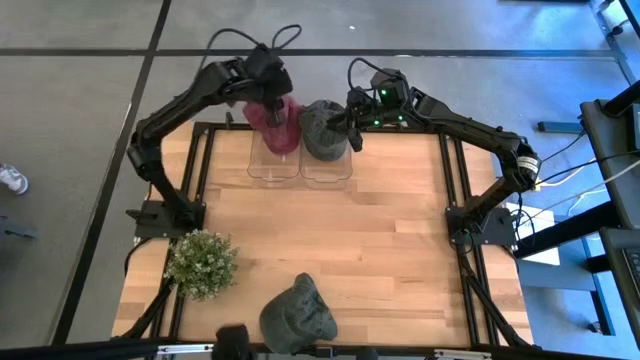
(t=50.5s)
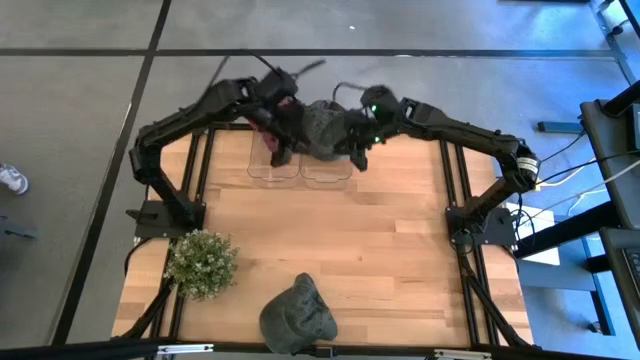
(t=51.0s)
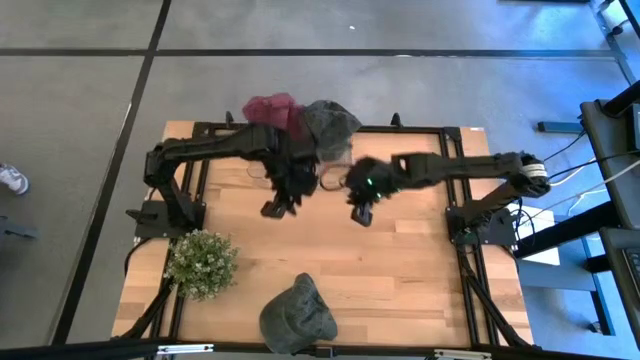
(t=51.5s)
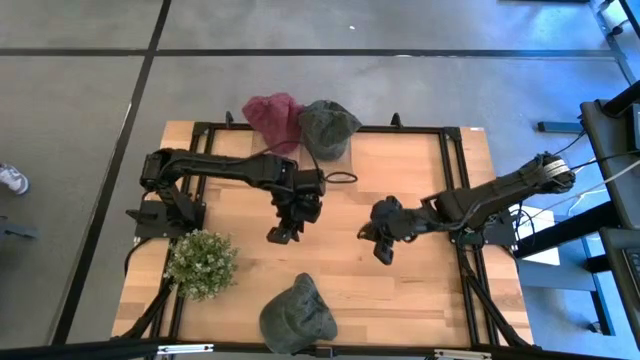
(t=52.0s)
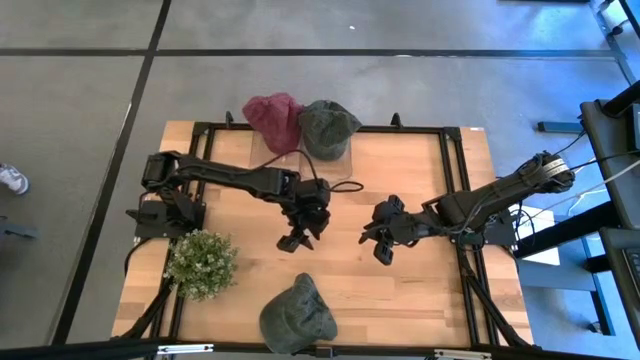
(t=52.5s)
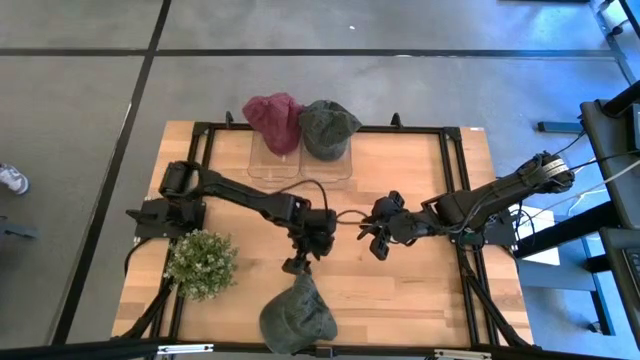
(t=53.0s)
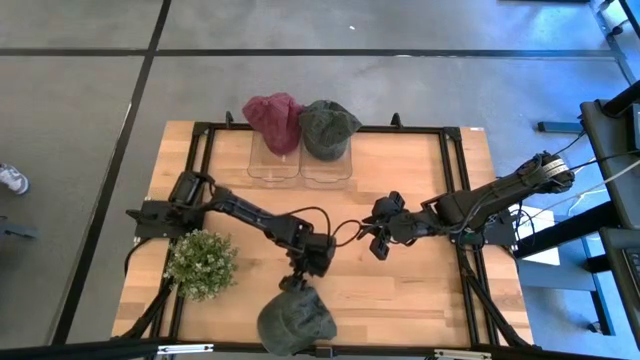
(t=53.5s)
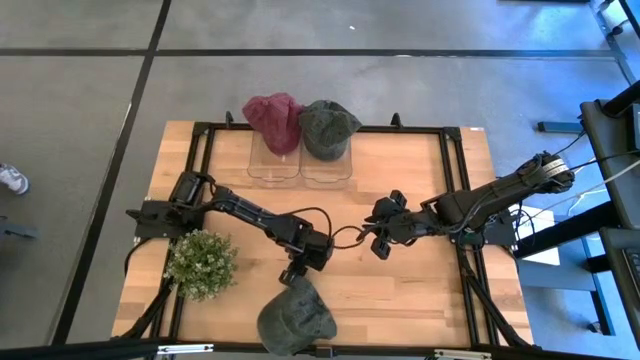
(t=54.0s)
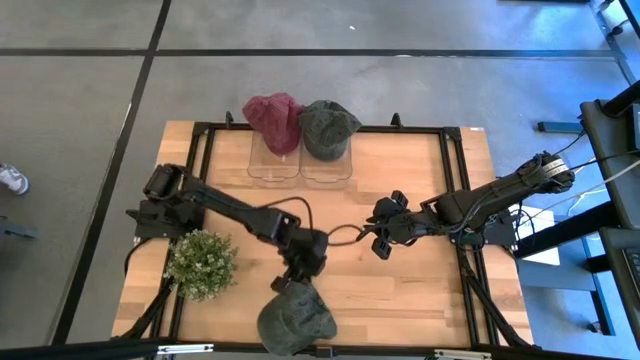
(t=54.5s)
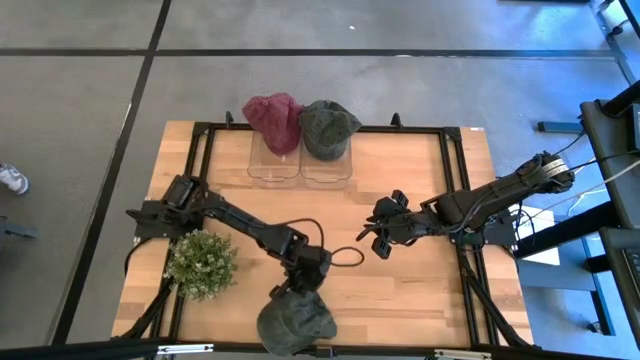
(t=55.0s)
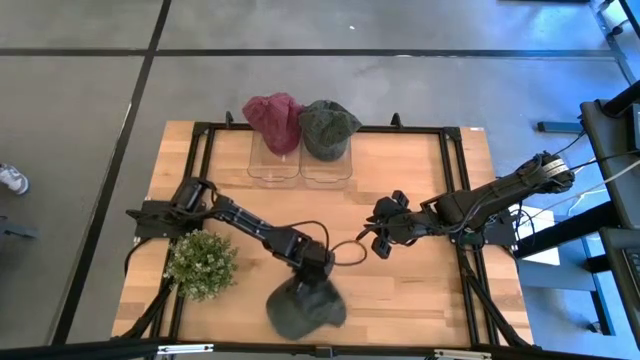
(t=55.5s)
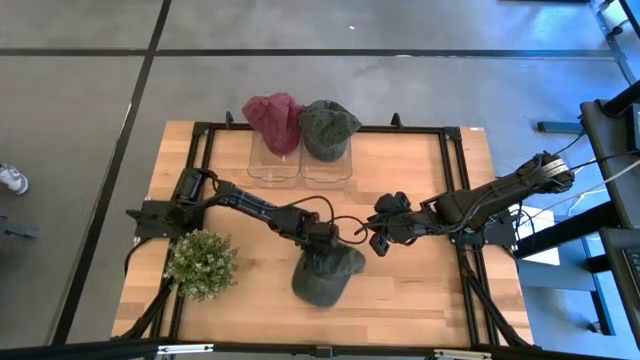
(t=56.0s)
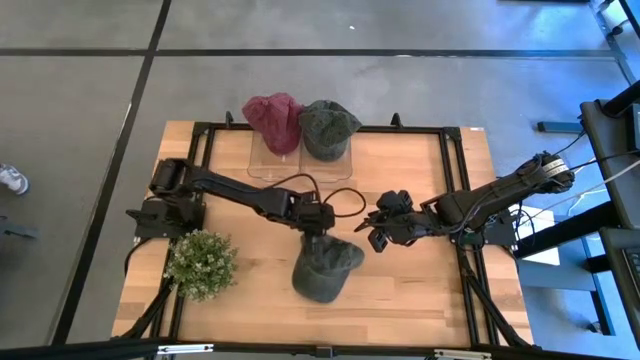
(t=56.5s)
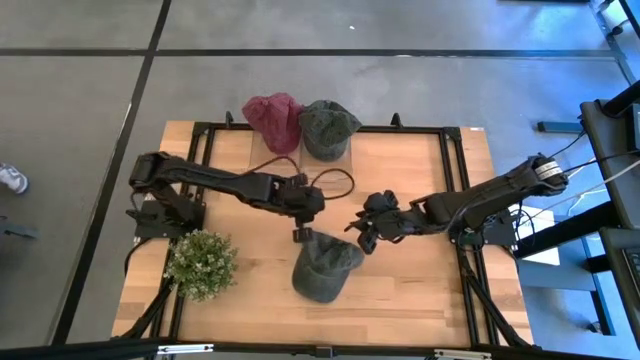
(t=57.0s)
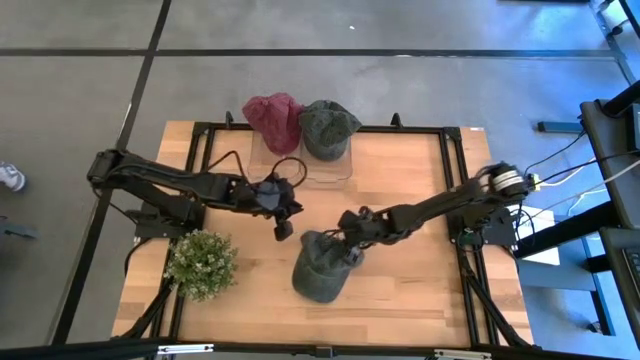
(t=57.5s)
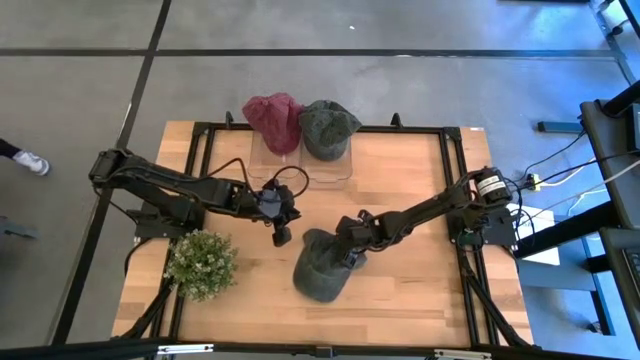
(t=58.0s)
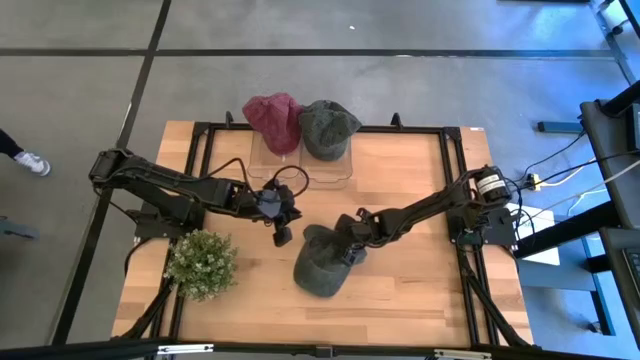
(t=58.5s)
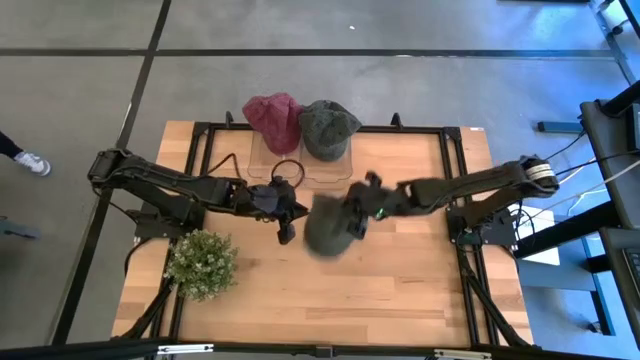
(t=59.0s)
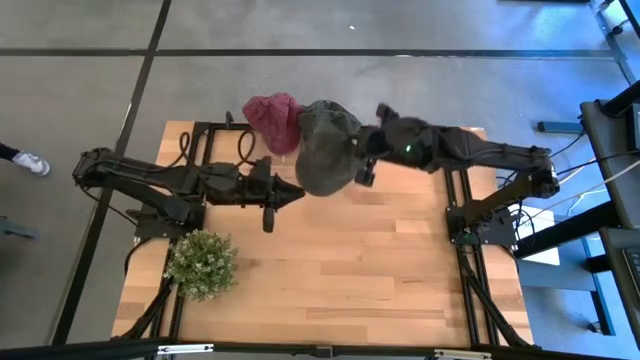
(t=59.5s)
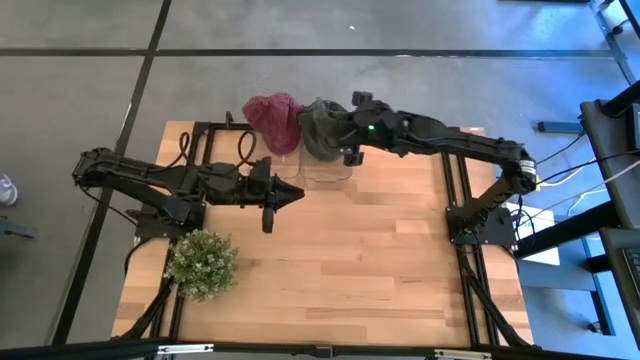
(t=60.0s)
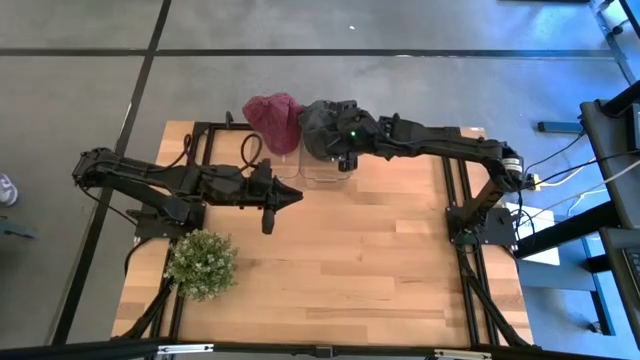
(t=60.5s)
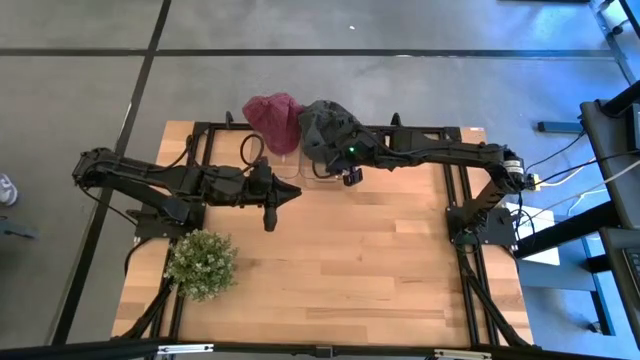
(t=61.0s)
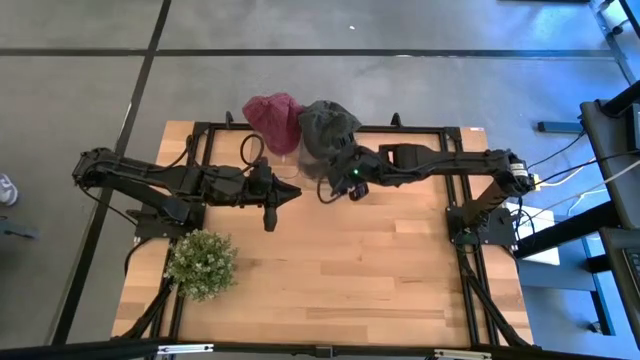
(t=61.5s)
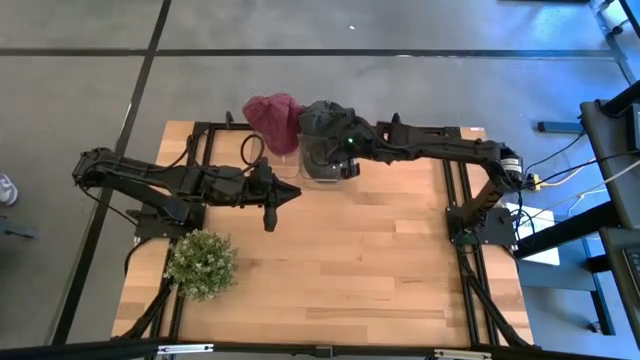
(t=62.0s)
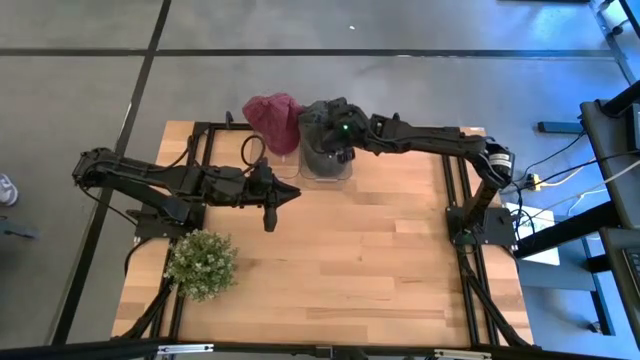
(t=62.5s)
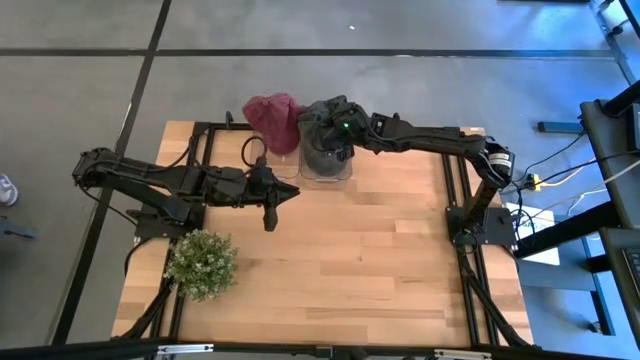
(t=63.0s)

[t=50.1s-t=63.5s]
Task: Pick & Place hat
Put the black cap into the right transparent bin

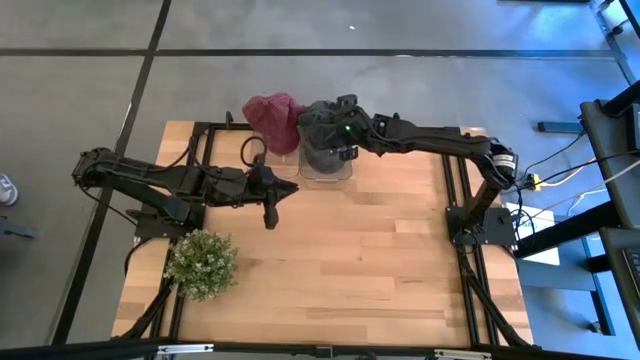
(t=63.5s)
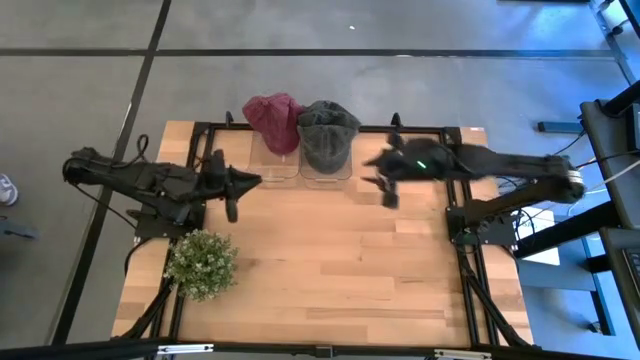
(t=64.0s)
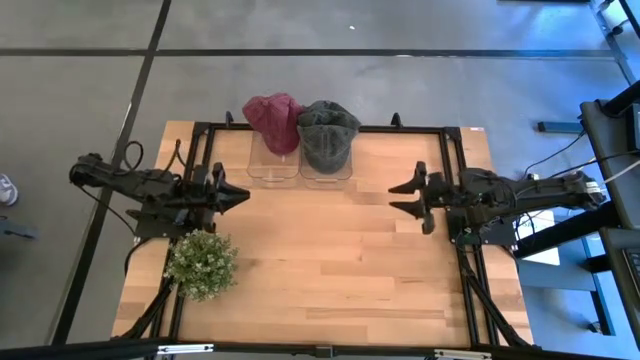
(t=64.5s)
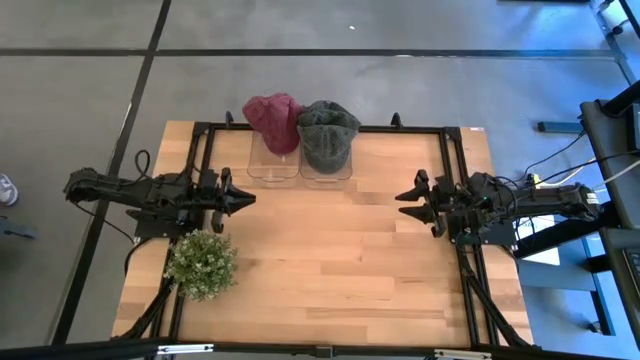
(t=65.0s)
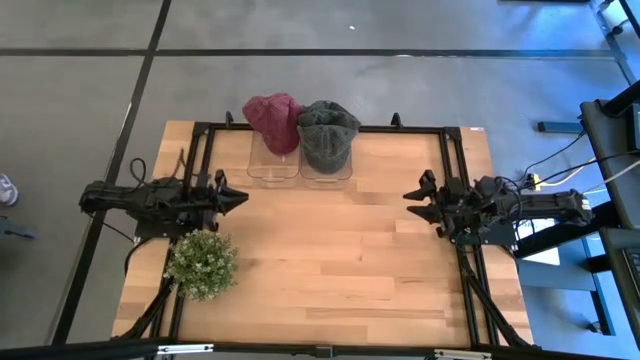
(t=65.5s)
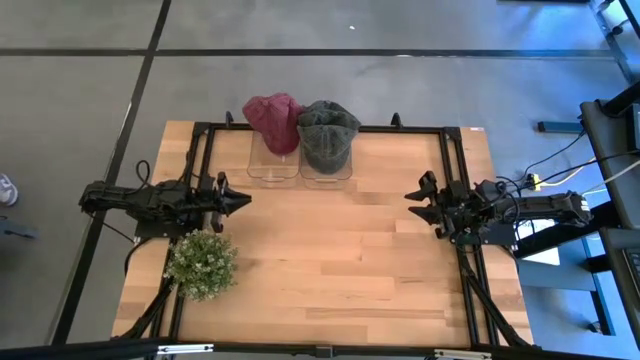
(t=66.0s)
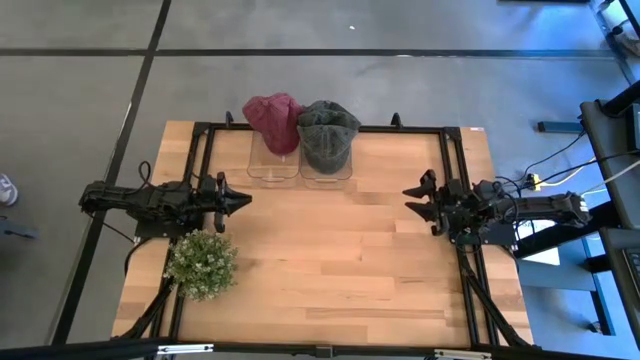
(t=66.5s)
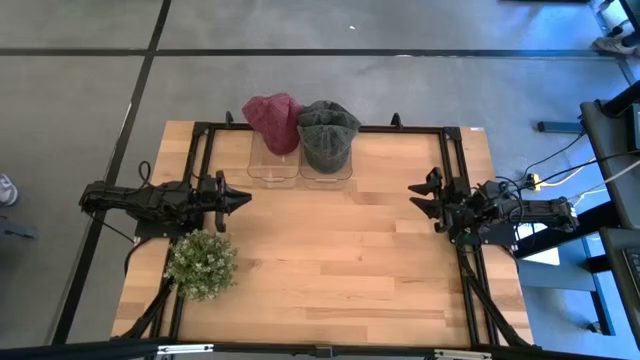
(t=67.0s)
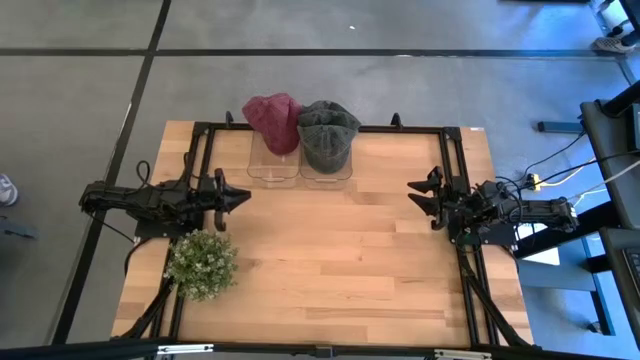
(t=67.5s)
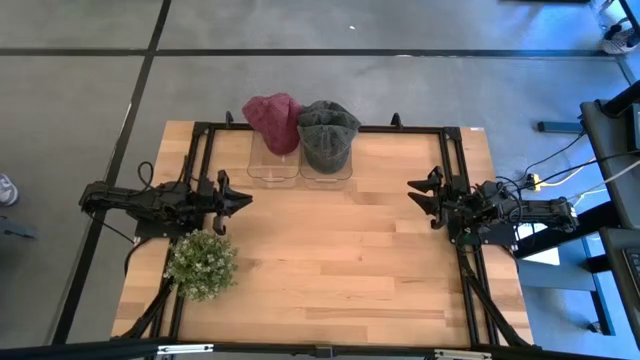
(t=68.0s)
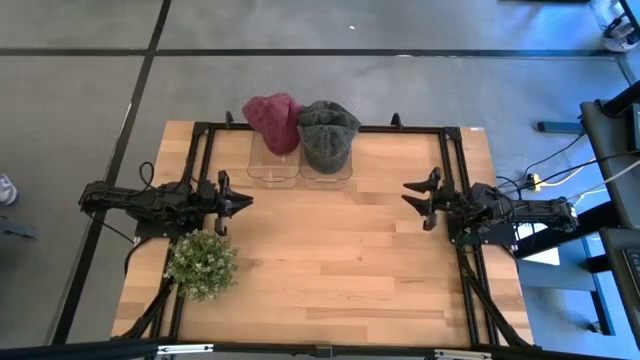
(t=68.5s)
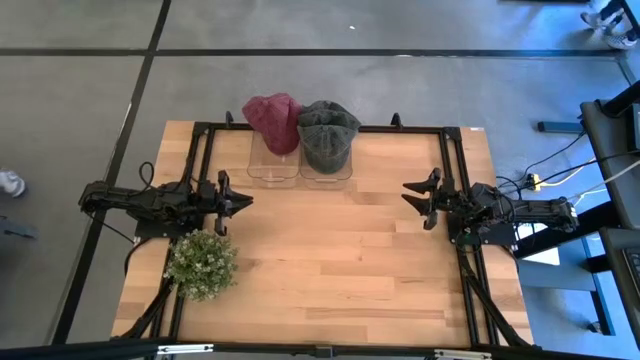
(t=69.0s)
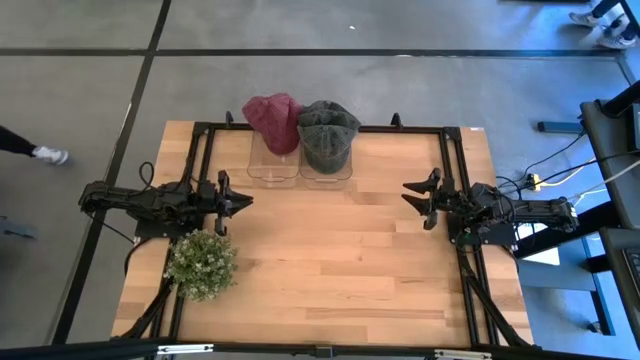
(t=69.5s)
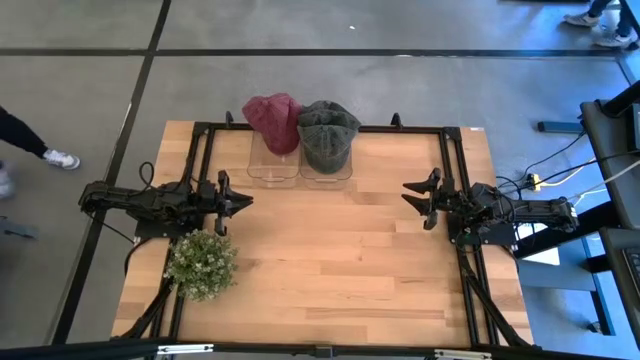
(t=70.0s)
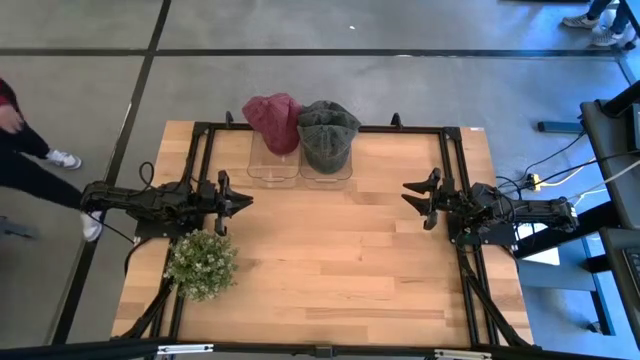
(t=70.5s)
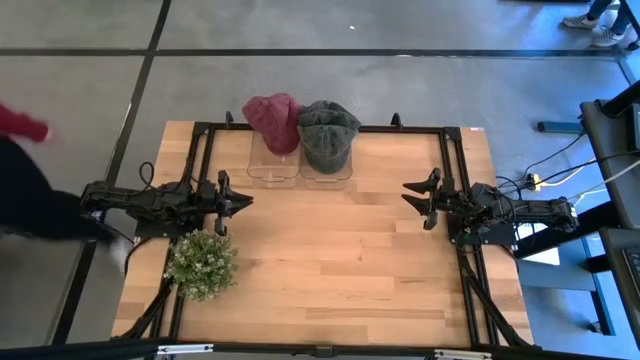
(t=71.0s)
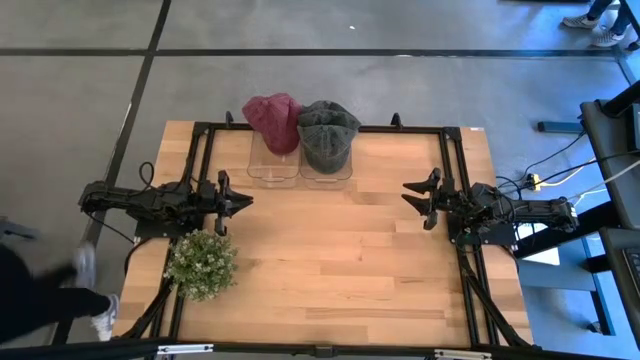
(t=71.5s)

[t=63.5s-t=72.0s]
Return to Home Position
